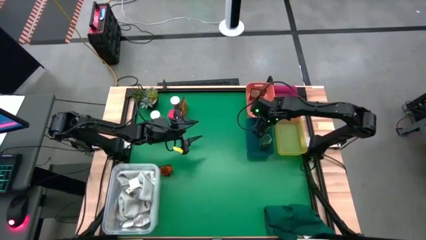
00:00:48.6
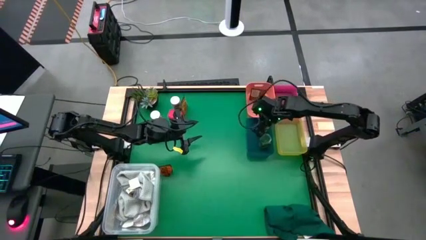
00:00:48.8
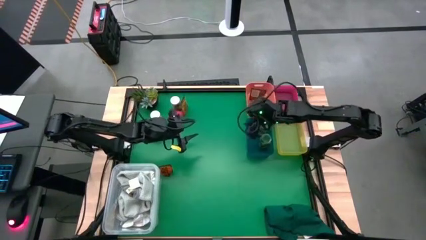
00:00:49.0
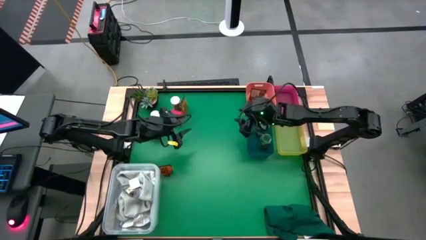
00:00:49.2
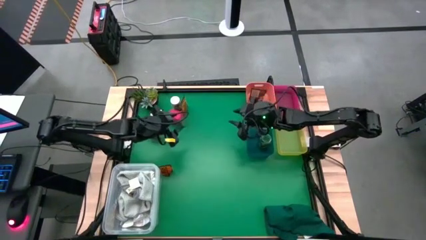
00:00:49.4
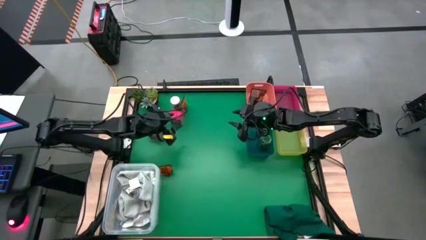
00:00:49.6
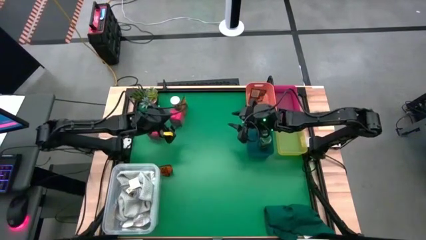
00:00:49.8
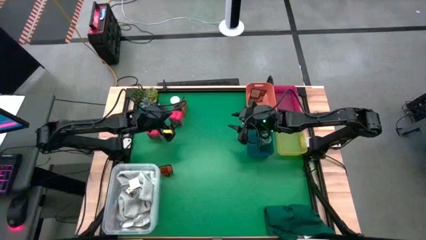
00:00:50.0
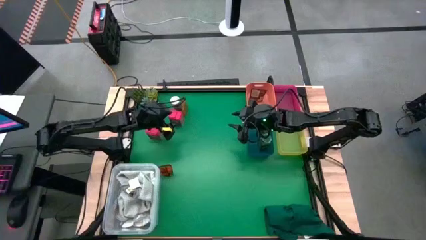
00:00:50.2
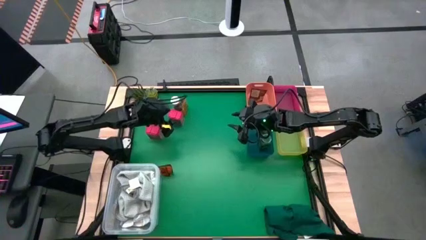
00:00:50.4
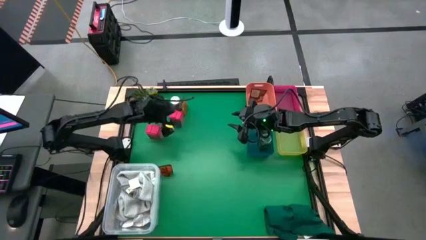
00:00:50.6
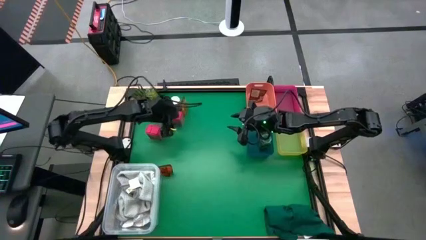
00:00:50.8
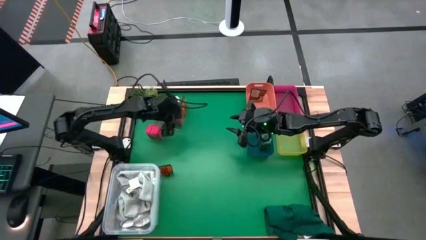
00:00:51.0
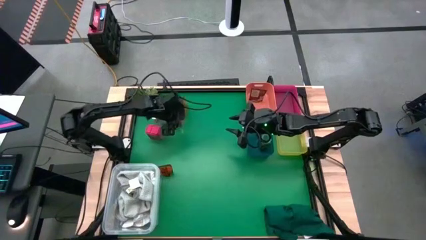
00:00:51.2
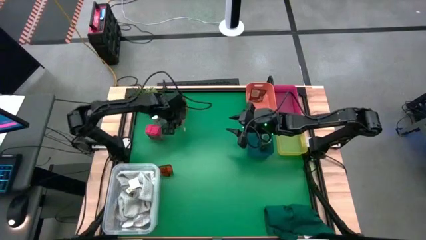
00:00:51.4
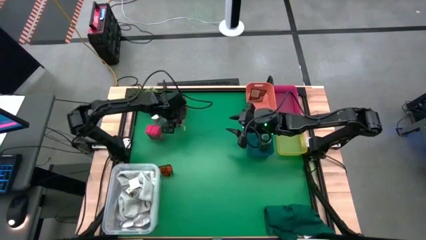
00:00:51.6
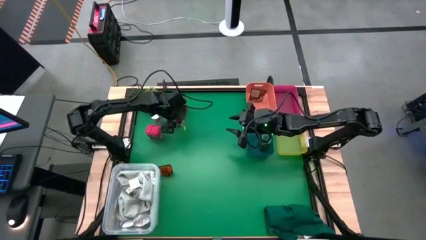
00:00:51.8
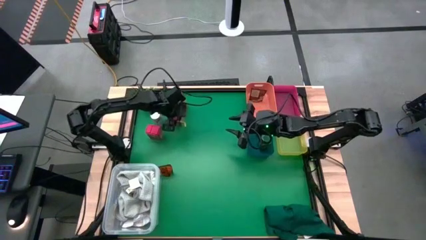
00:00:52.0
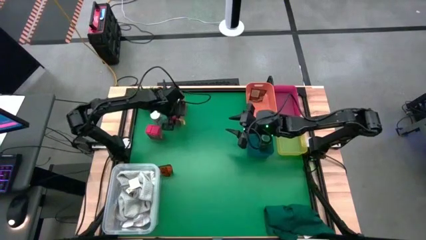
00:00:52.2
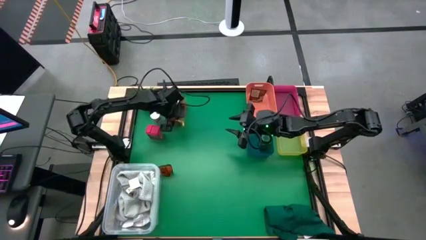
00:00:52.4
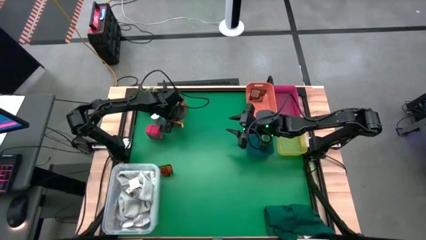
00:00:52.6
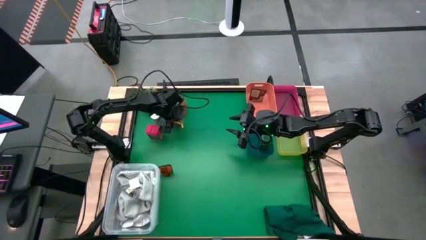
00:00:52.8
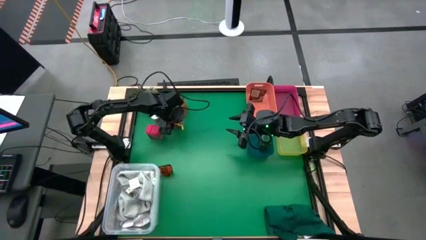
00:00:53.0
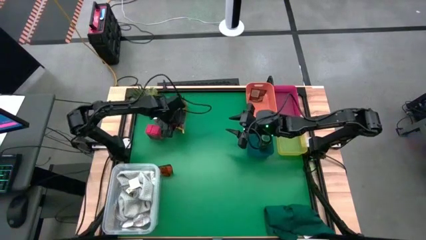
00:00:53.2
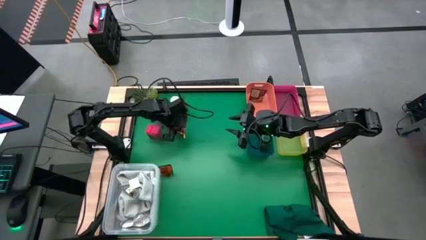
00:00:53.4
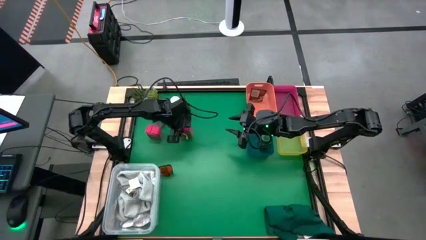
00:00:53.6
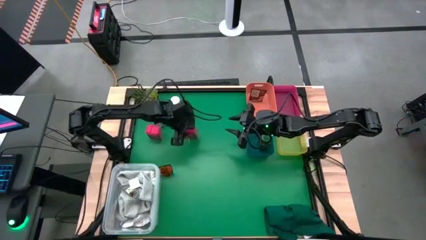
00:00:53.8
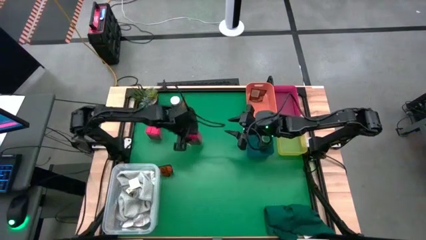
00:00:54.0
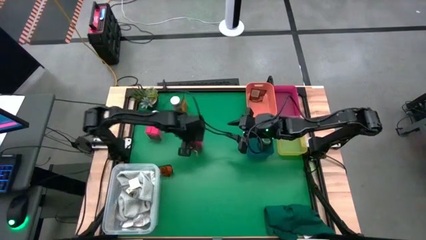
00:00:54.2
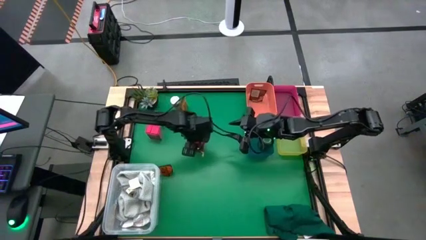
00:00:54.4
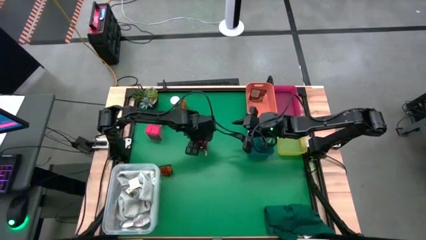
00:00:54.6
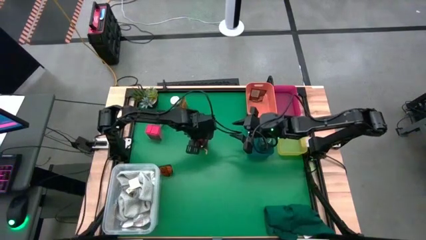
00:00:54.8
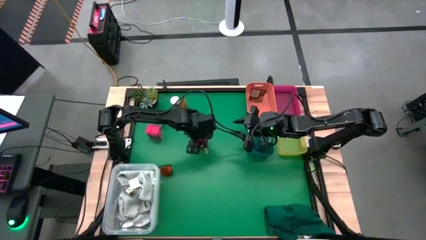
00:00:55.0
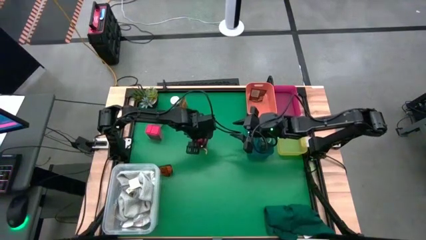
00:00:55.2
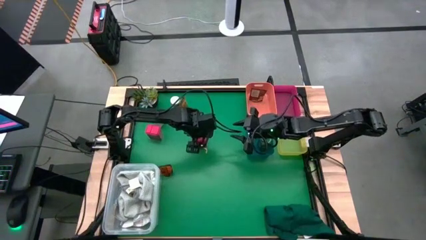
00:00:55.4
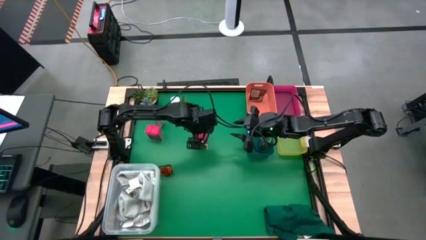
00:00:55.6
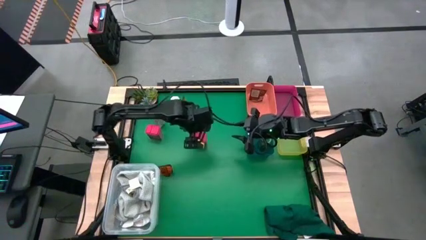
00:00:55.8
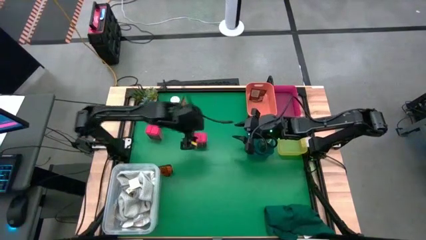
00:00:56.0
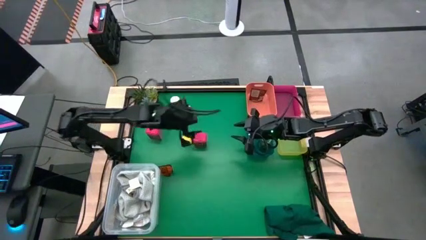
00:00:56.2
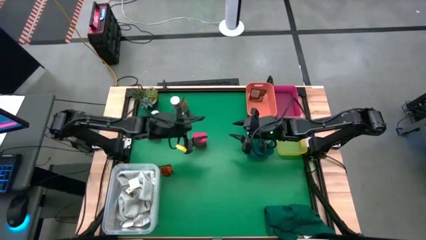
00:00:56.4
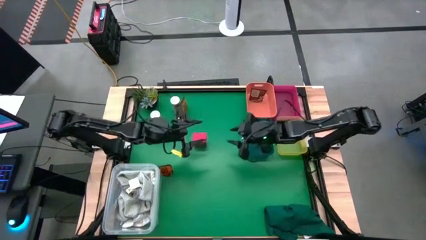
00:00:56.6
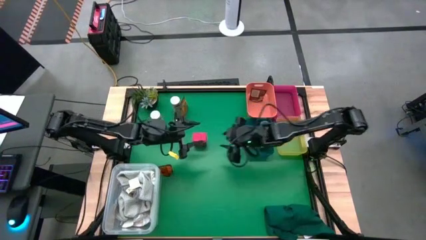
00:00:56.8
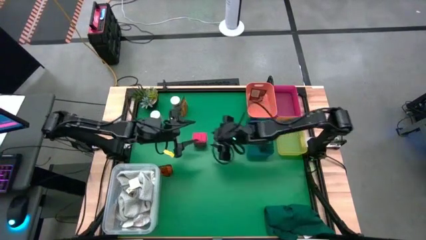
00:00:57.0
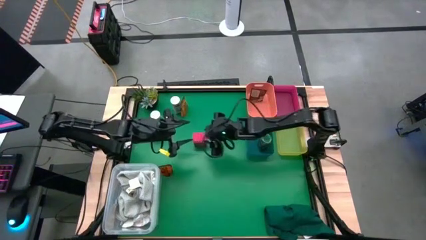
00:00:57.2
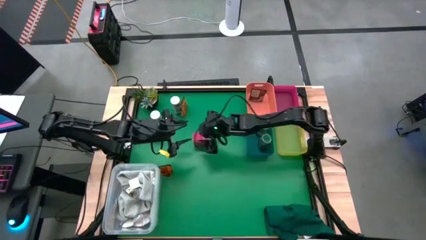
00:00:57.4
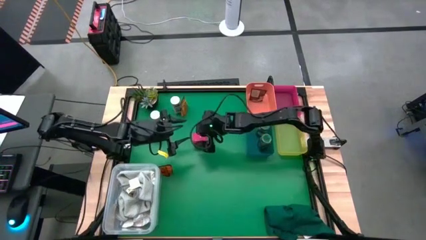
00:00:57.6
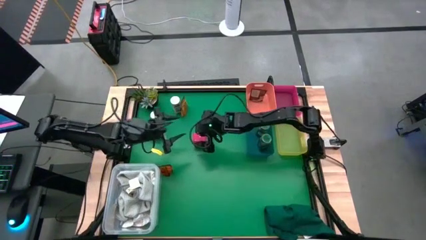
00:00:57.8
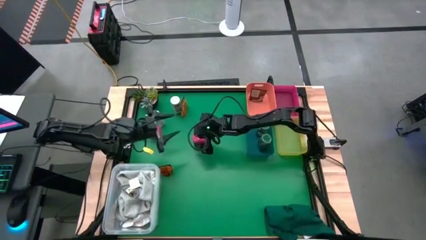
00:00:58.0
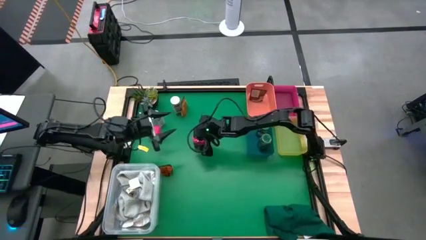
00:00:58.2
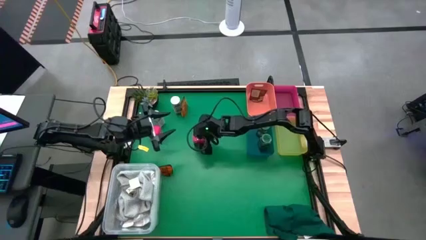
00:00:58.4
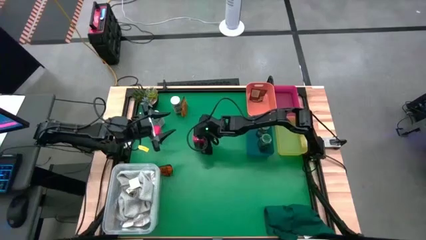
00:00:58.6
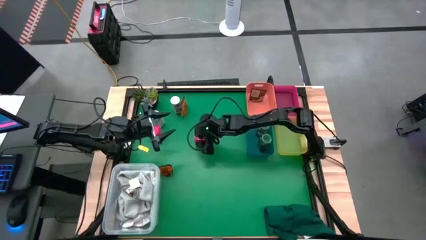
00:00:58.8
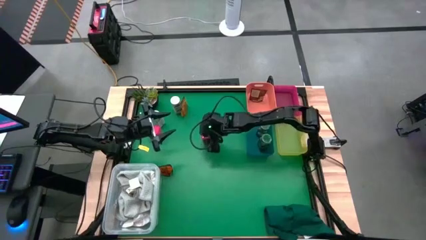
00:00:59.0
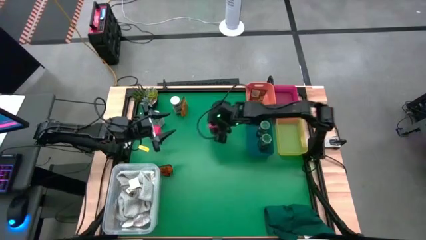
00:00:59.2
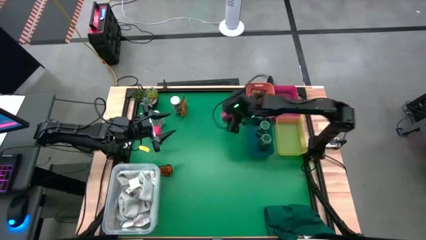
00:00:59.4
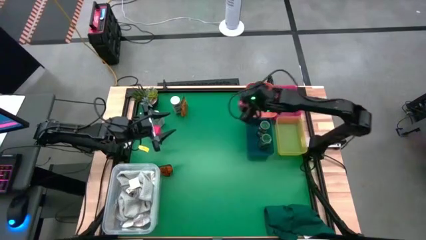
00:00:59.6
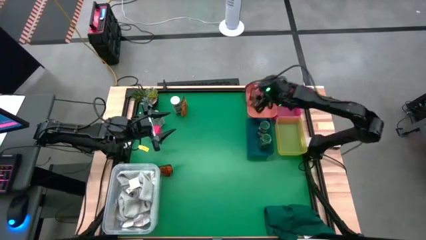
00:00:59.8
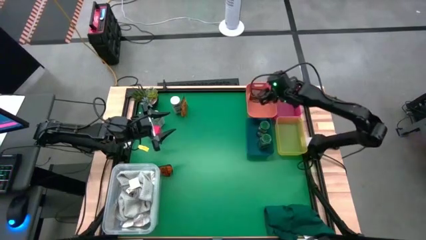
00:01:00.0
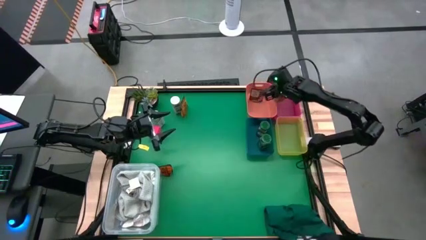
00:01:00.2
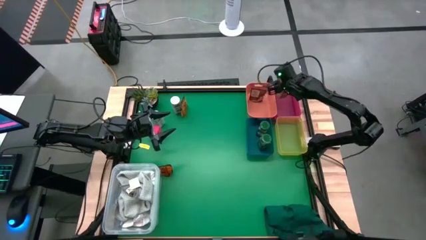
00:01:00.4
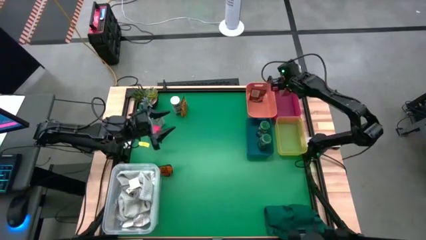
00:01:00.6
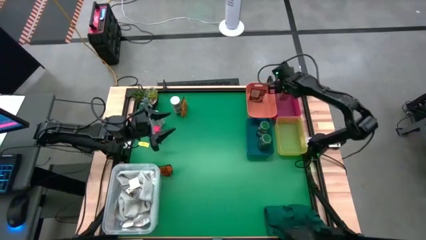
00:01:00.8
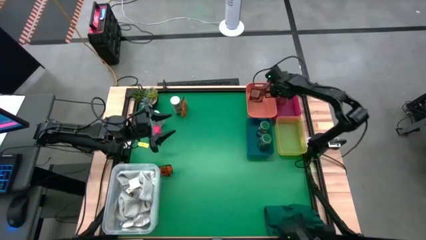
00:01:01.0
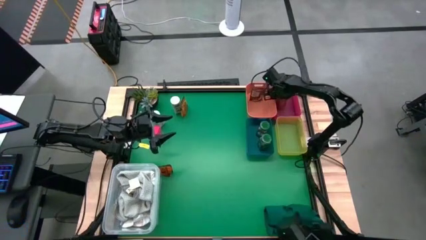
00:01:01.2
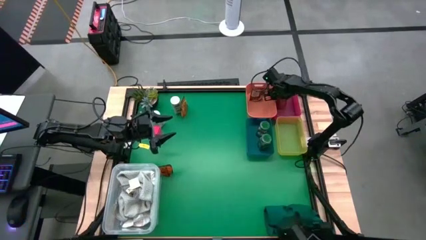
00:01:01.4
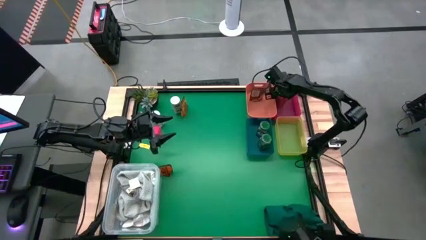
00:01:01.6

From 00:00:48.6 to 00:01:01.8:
Task: Sort spices by type
Put the right red seasoning can into the red bin

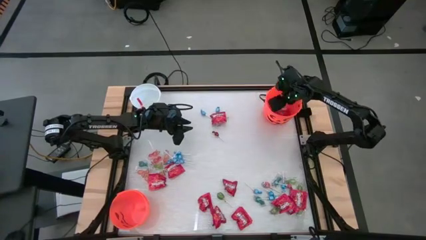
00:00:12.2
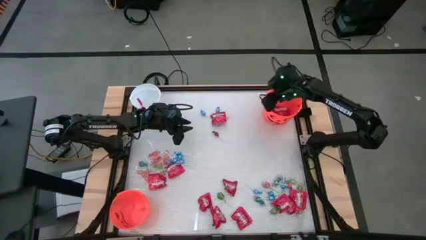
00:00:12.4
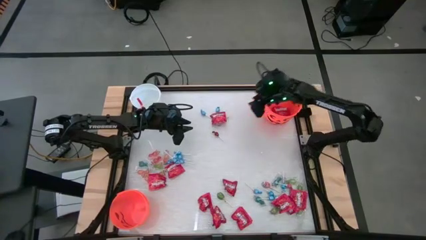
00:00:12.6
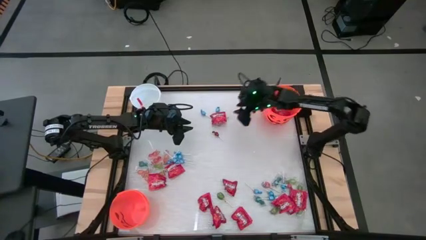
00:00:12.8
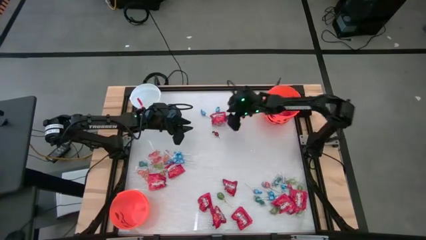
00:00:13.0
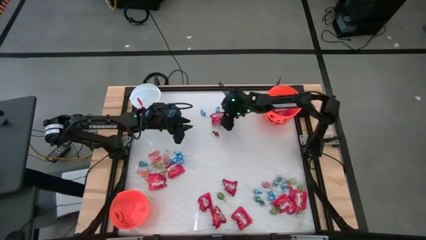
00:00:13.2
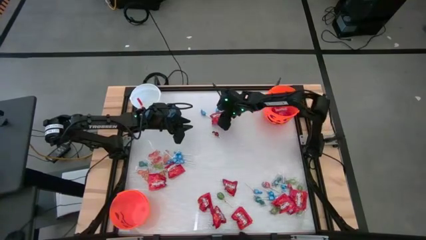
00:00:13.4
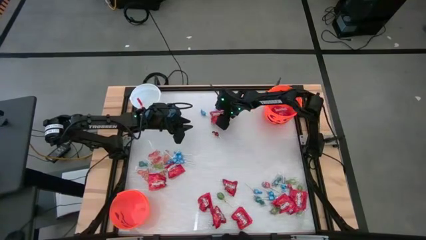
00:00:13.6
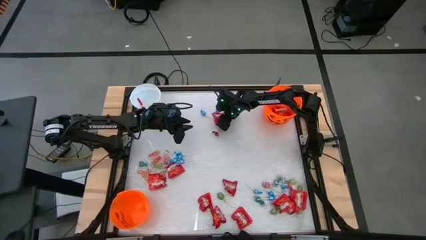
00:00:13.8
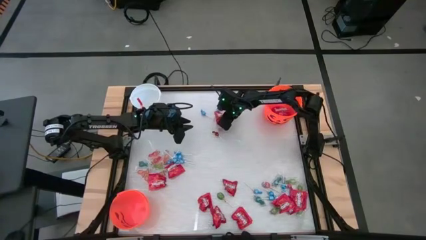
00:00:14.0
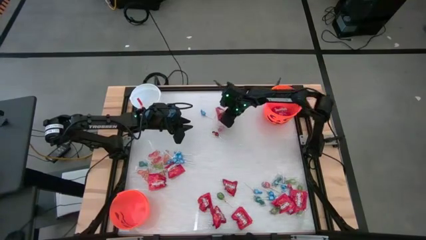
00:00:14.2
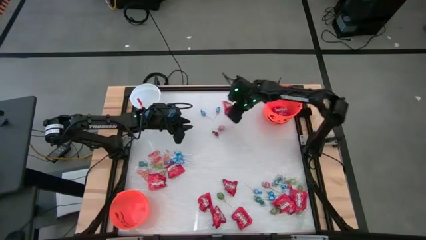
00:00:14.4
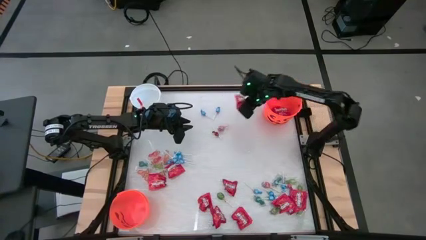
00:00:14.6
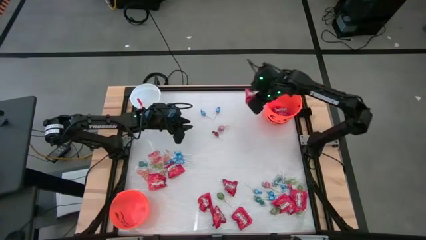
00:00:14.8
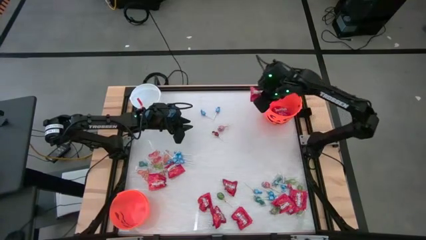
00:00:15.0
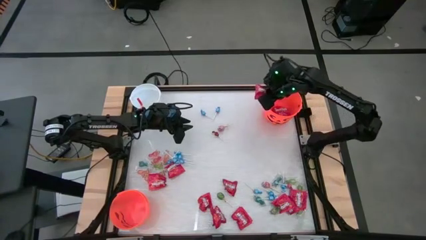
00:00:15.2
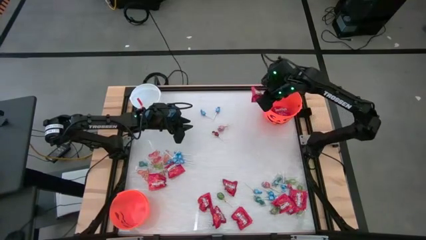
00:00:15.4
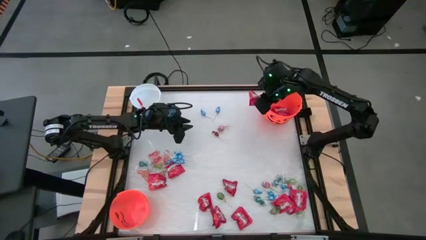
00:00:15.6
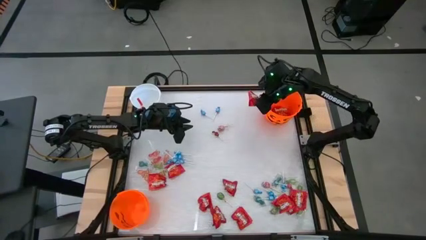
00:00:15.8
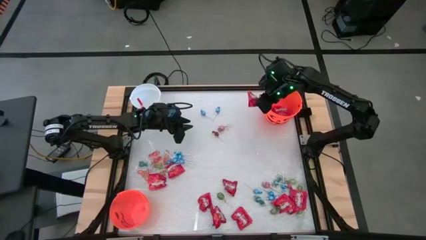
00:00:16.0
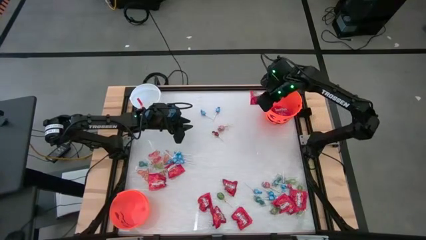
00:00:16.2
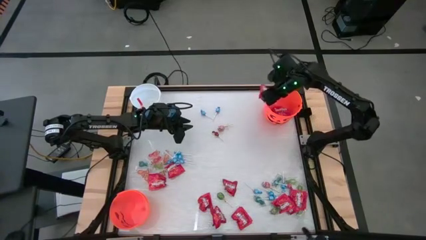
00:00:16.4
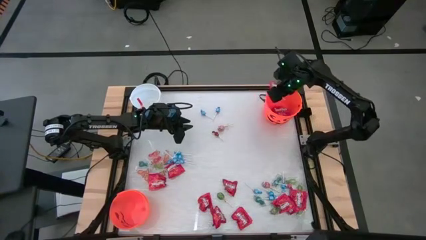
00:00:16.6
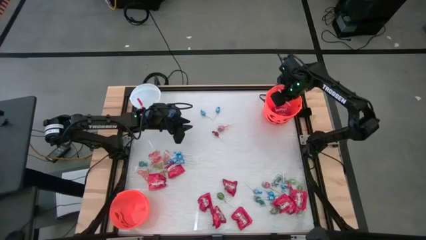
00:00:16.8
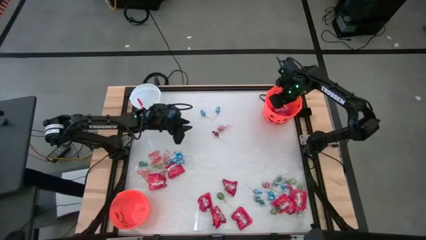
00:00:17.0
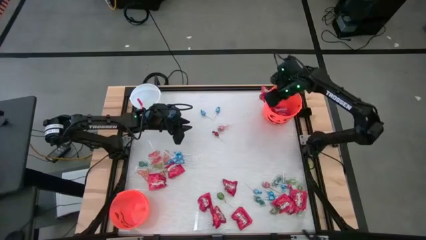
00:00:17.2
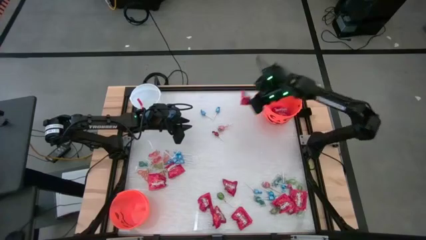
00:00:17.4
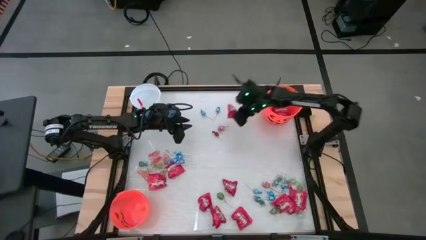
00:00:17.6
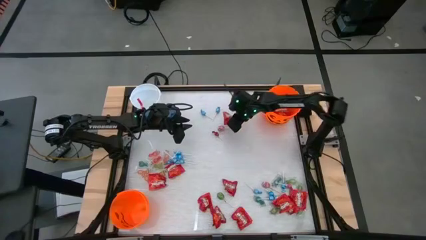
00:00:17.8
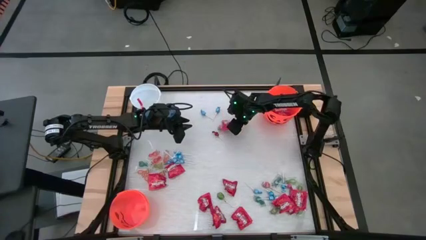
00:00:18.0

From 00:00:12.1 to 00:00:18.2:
Task: Sort candy by brand, put in halloween buckets
Put the red candy into the top orange bucket
